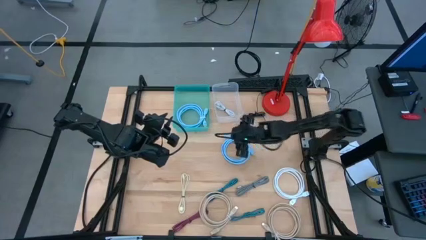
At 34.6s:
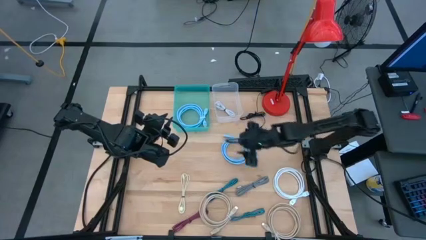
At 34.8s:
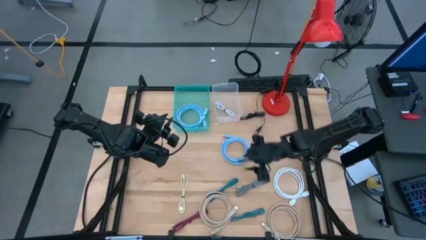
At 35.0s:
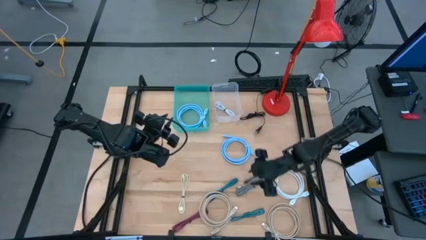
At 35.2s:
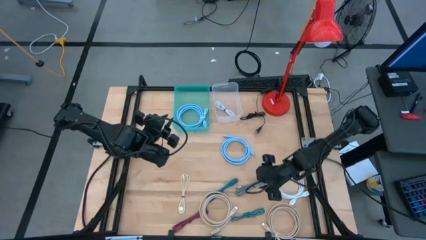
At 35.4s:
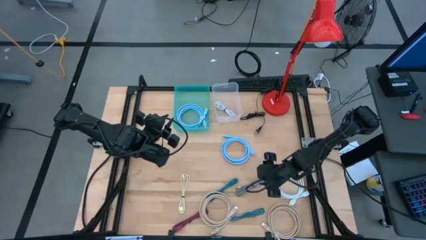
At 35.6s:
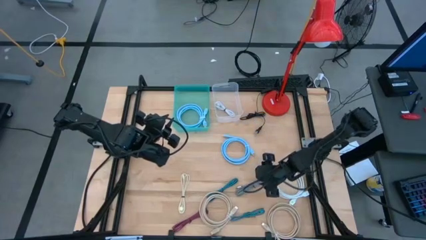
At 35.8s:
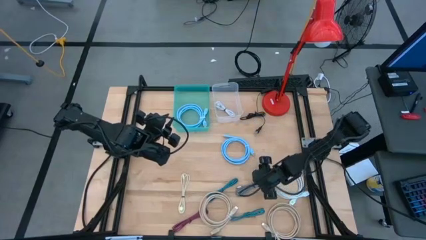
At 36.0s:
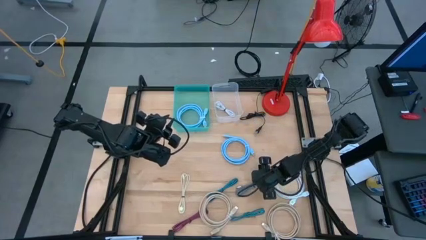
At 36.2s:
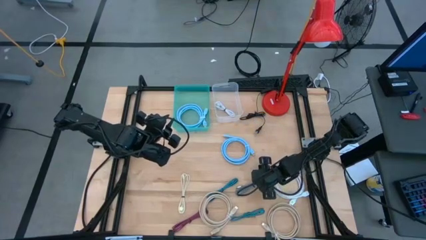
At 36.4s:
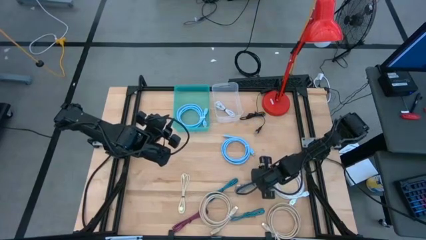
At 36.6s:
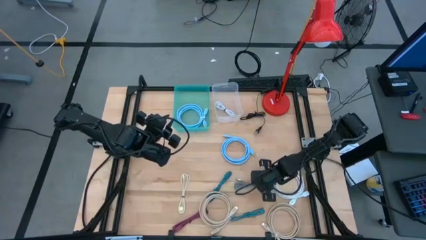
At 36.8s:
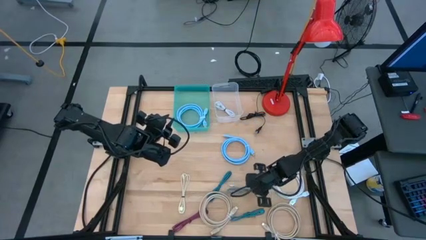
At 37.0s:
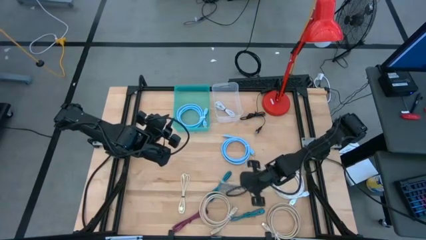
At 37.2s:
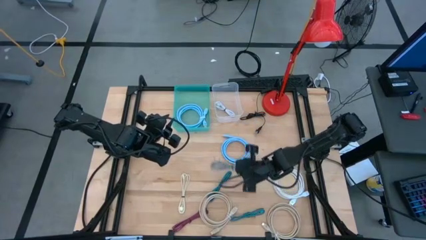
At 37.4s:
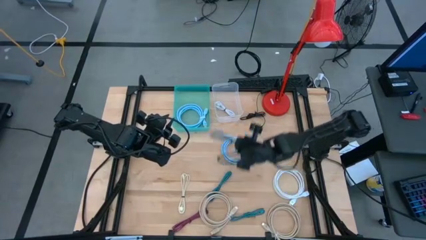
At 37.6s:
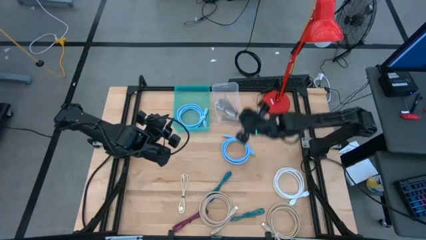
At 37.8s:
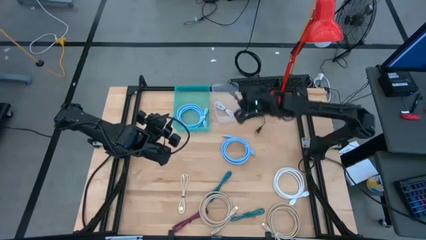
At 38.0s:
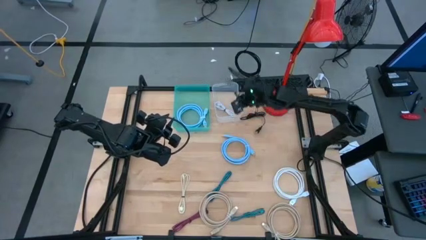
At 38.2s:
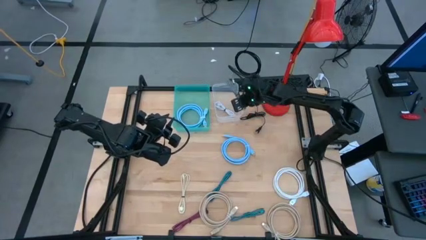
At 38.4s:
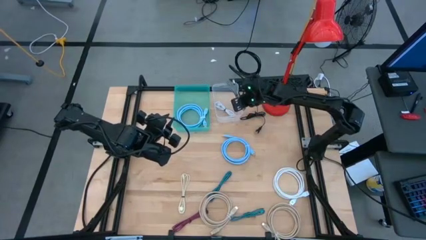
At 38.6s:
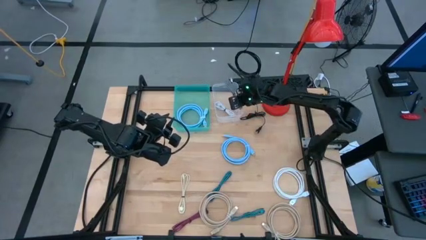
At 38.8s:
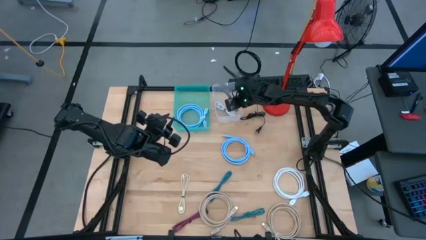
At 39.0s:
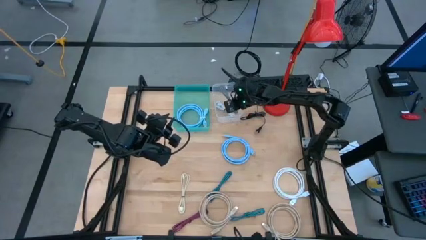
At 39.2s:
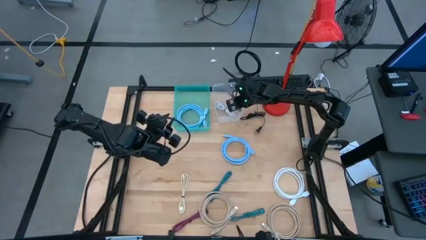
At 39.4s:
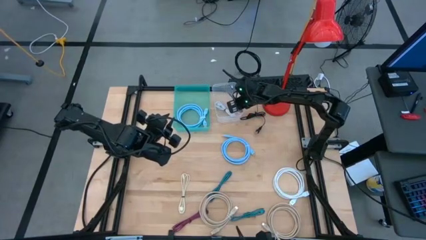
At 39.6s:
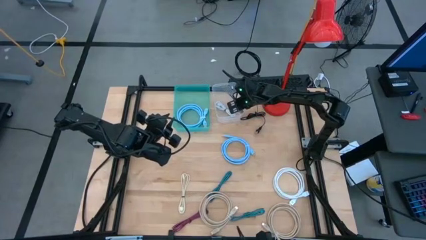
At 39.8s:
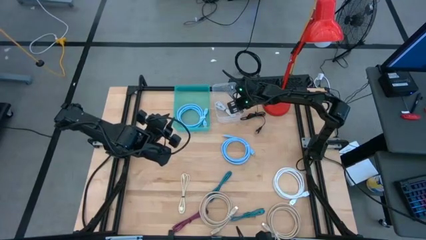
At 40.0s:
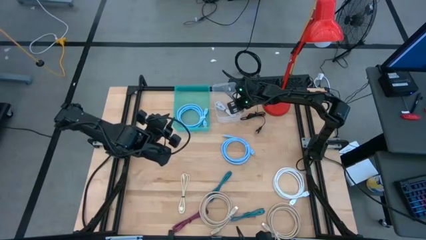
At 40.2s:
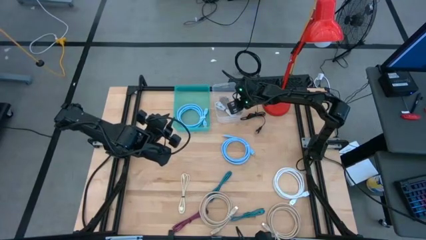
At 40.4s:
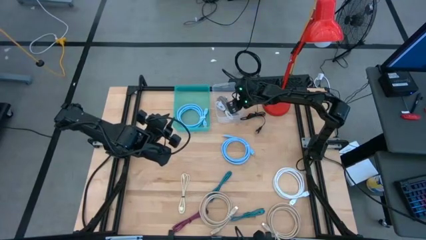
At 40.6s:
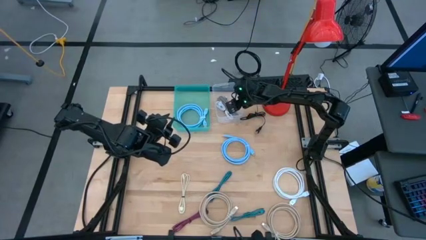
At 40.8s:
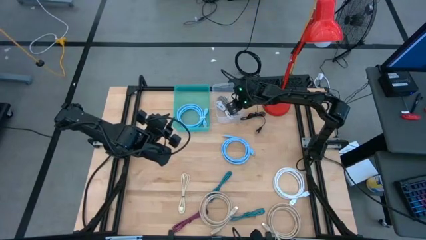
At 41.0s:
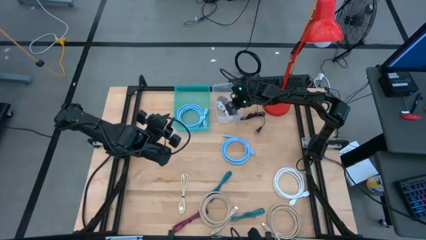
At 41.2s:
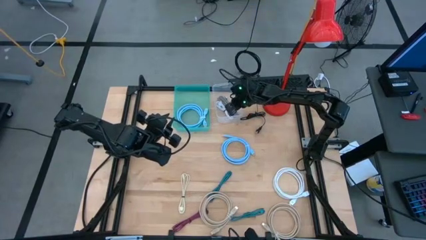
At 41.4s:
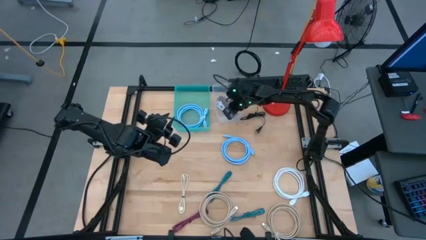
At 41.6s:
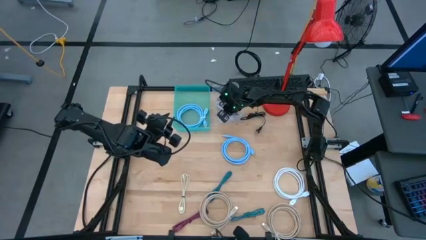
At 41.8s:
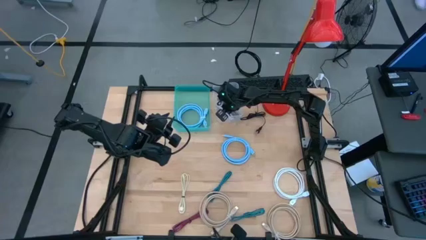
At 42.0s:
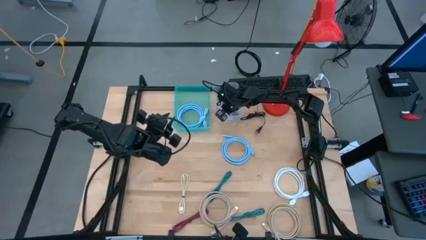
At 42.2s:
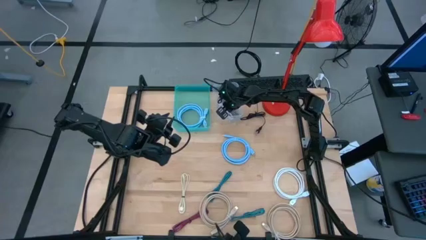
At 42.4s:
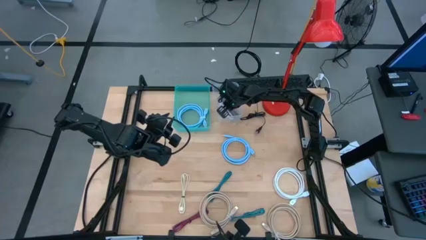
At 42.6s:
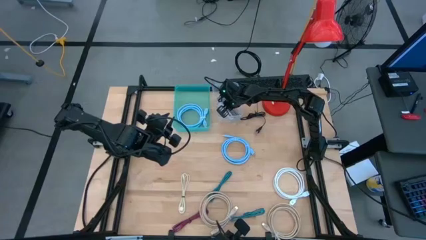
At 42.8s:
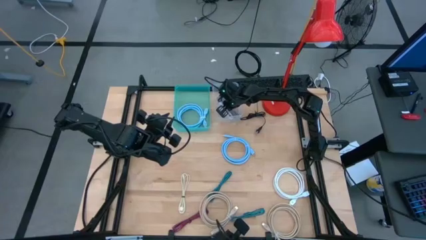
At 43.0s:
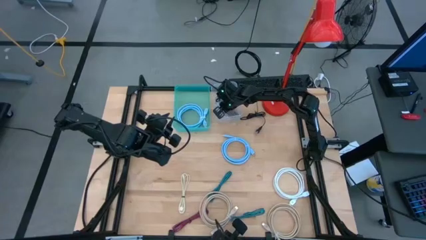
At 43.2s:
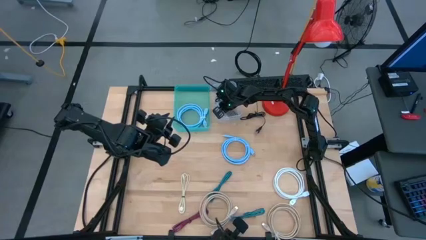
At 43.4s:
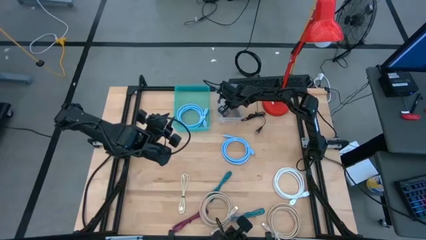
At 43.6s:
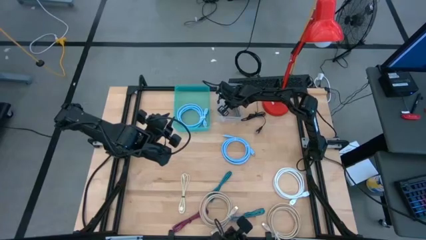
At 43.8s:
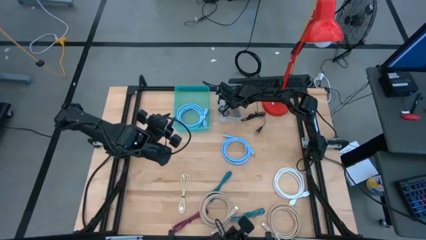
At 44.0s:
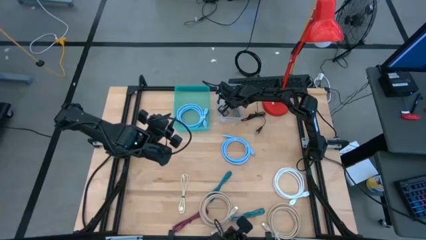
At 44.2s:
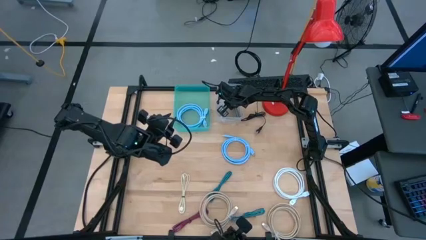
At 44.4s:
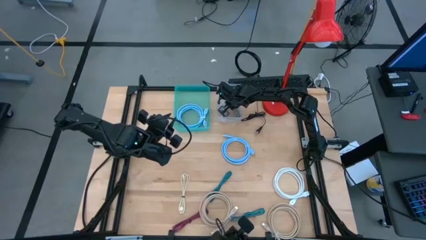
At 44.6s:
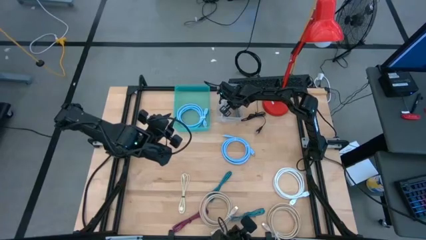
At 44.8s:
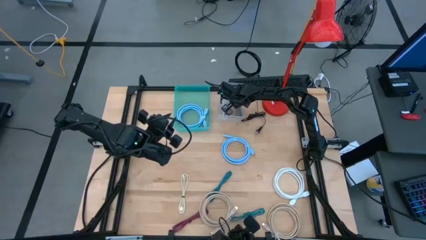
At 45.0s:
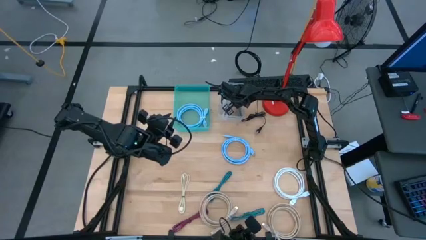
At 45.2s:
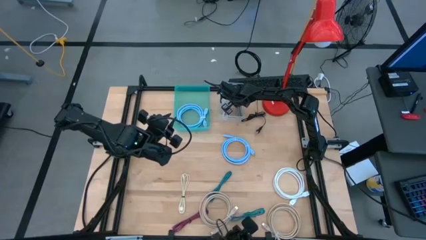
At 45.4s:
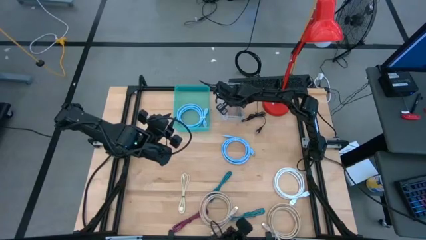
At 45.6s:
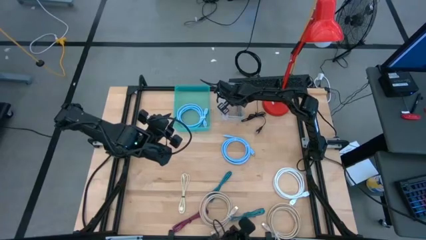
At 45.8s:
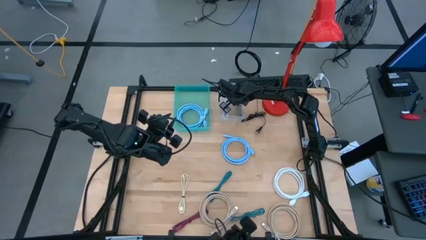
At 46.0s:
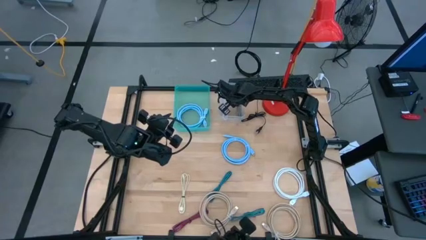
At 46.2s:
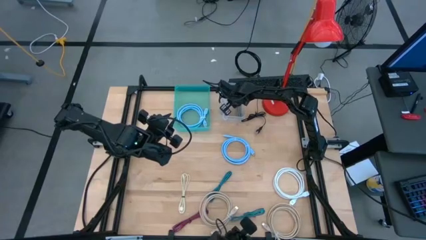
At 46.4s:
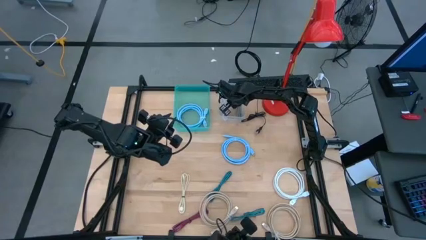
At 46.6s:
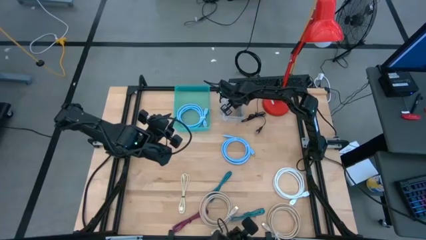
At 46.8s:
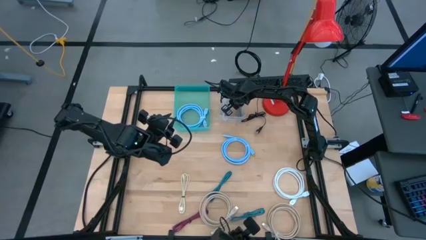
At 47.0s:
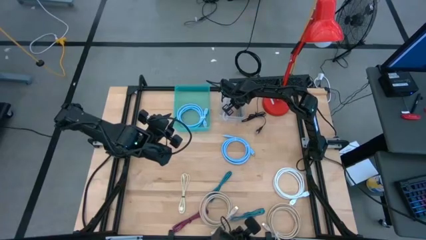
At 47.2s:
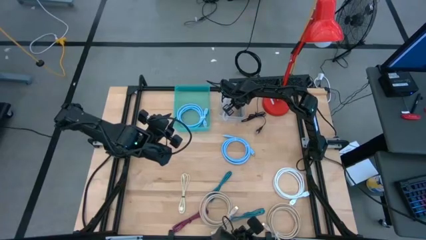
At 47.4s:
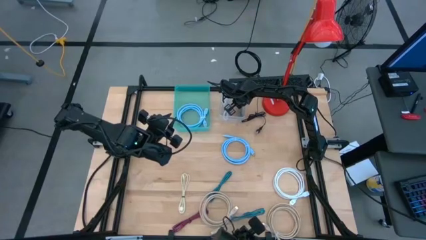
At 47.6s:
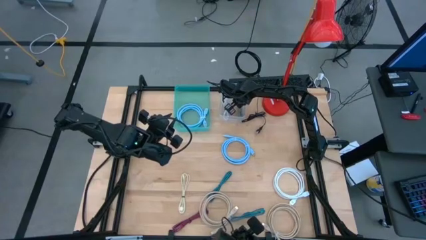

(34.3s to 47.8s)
Task: Pick and place items into bin
Put the black white charger cable into the transparent bin

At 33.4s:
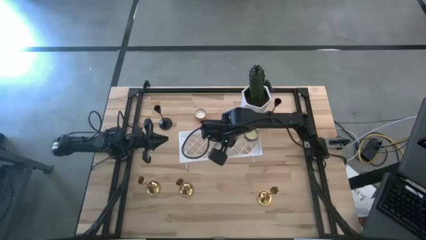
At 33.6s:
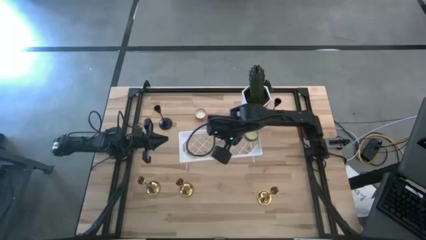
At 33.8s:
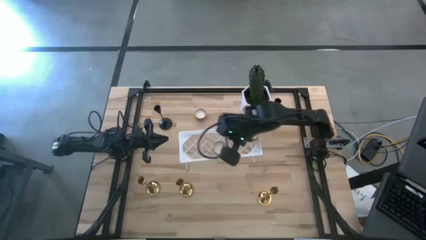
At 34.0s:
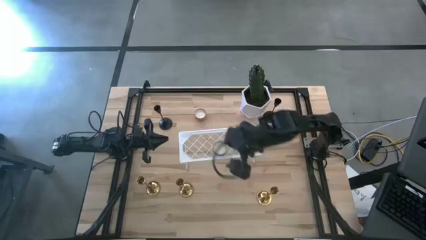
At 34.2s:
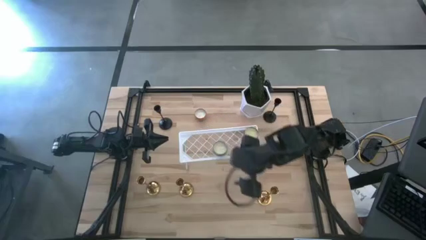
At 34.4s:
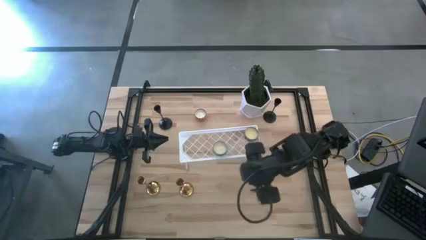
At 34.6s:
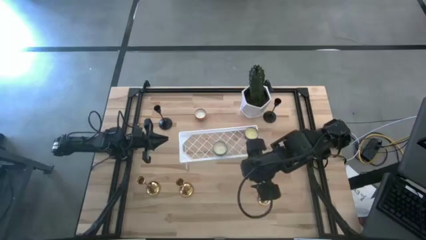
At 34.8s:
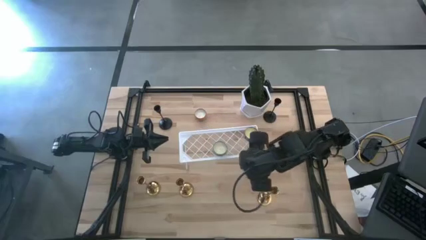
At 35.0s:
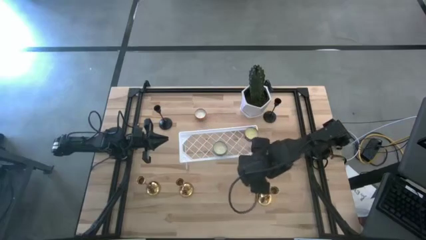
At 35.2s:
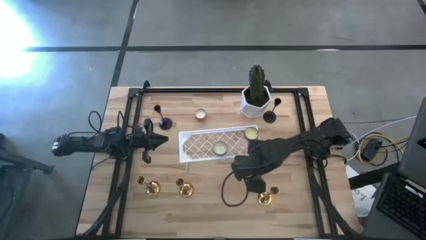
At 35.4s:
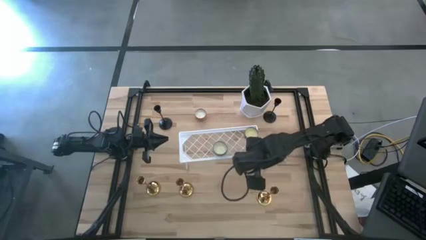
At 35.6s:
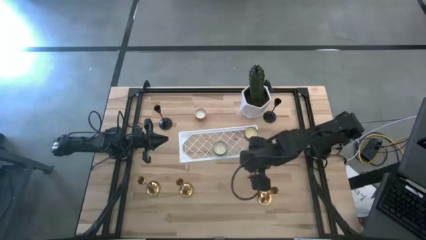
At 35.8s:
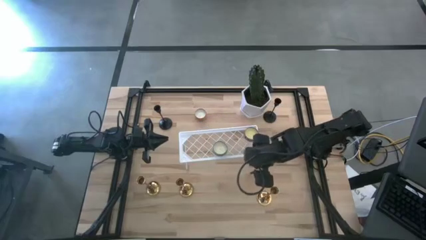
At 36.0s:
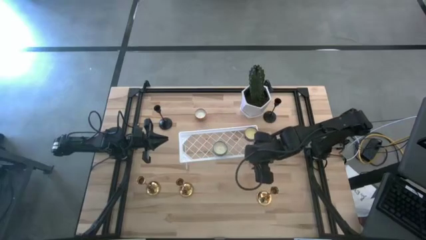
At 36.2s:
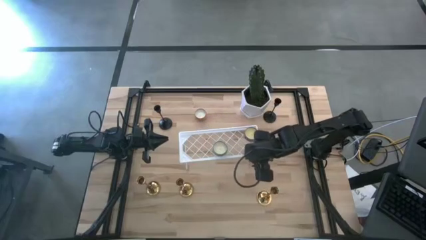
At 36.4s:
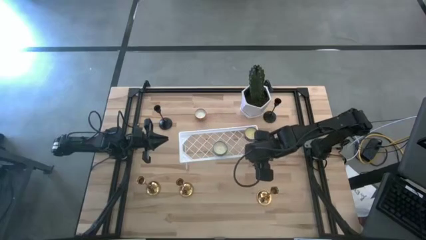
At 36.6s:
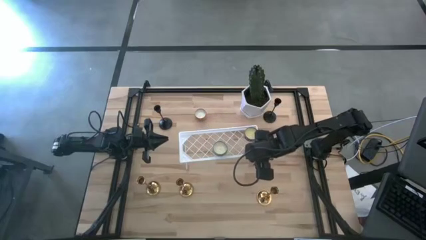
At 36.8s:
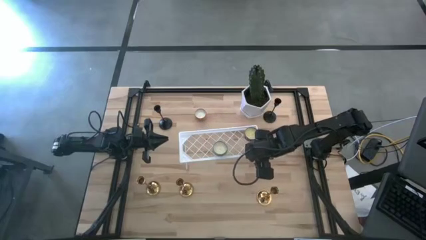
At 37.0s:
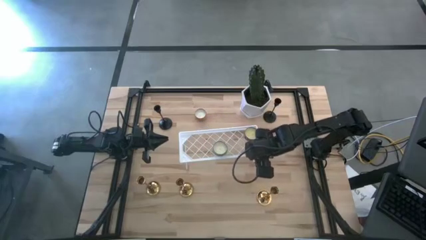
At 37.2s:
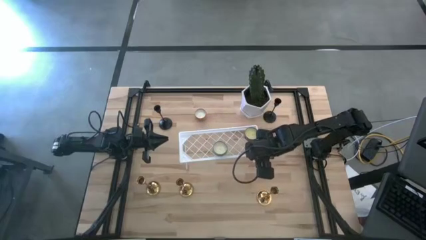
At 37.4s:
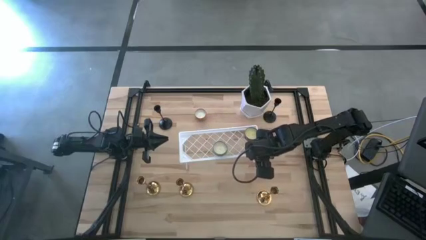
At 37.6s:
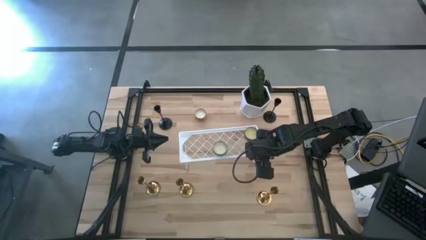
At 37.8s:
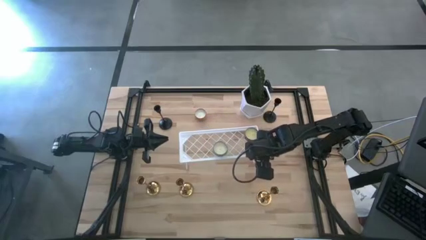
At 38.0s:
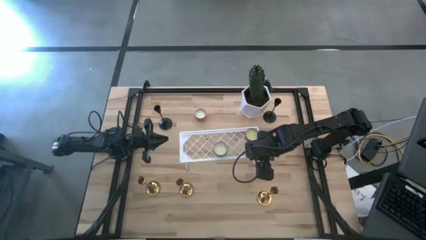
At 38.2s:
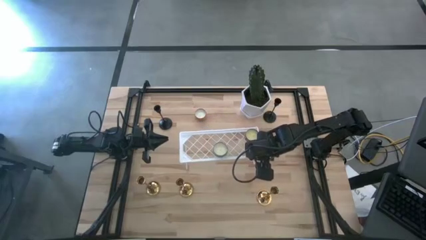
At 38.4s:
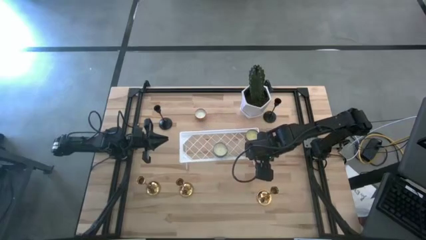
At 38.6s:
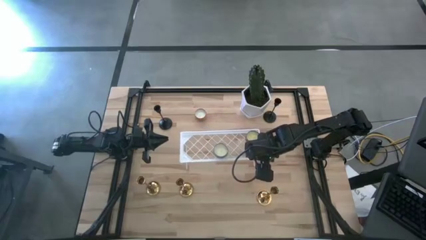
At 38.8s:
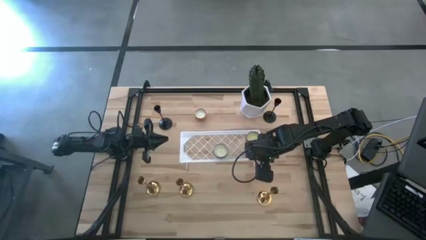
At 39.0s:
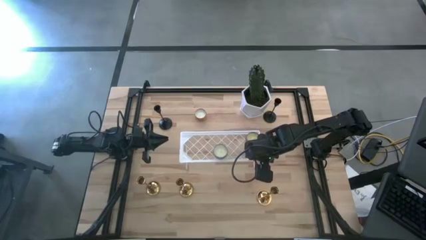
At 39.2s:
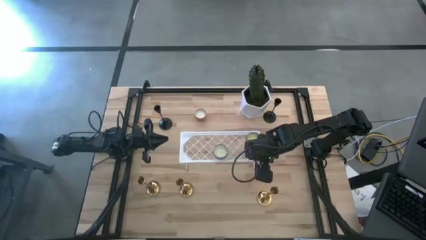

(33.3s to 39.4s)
Task: Pick & Place candle stick holders
Adjust the shelf
